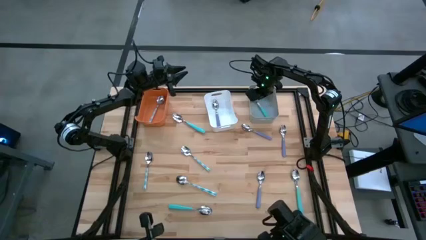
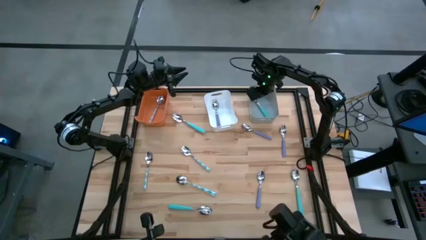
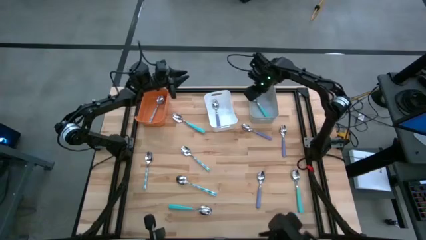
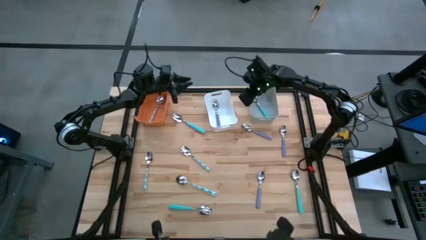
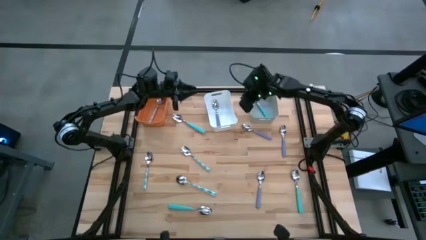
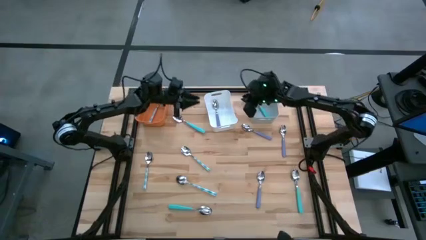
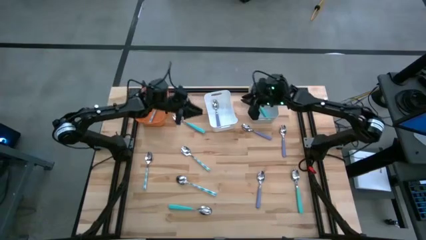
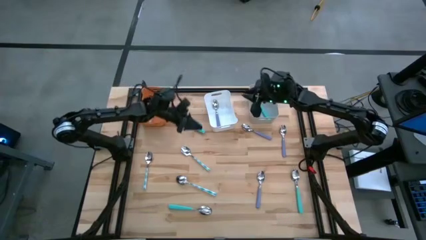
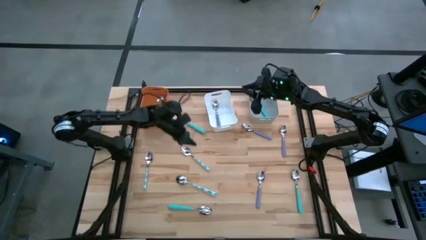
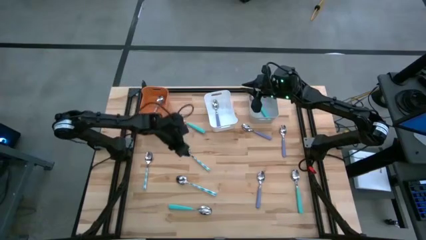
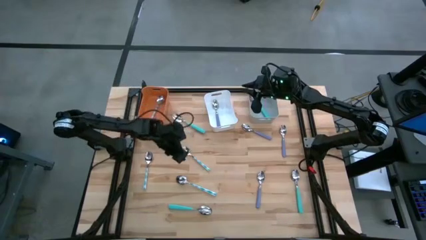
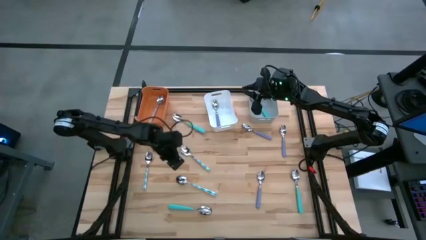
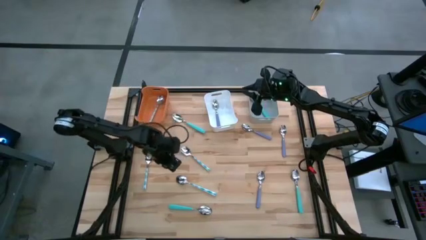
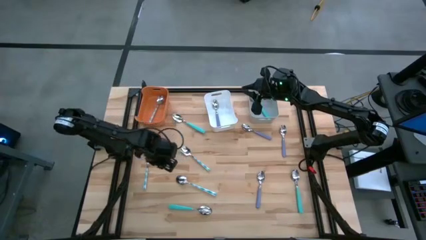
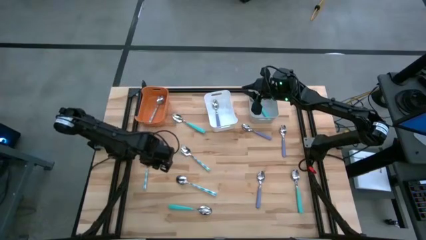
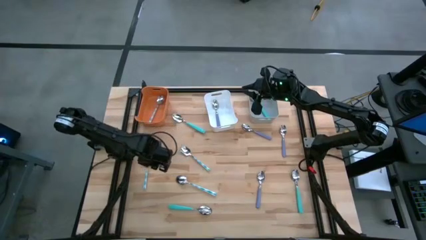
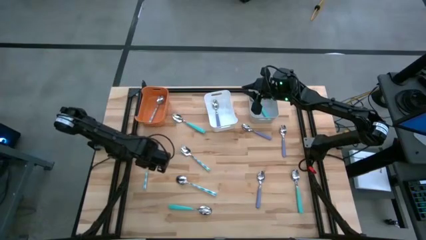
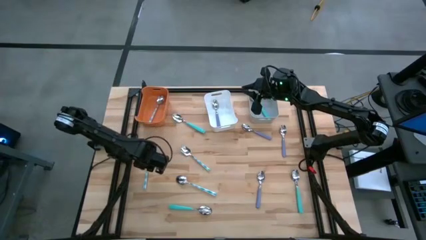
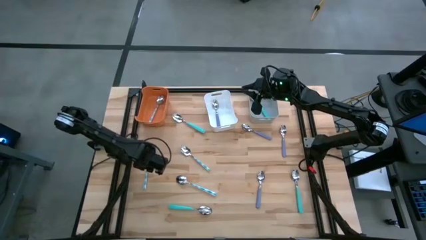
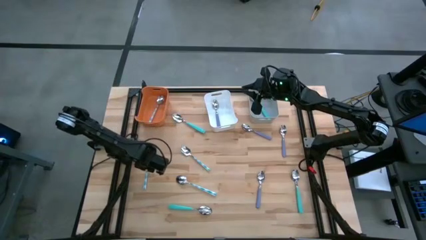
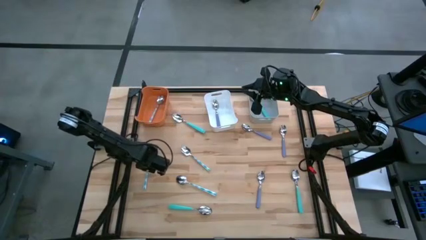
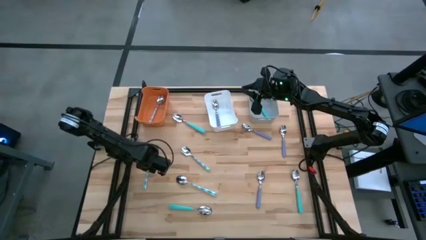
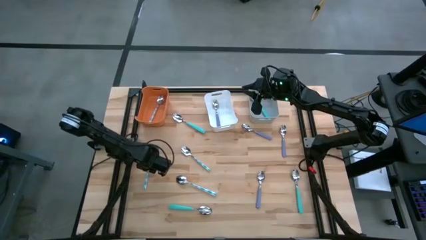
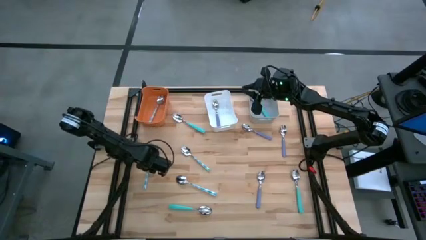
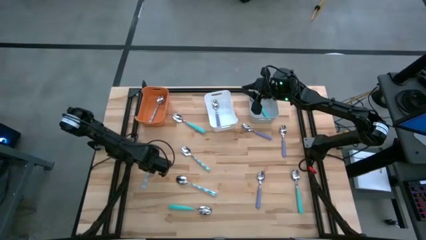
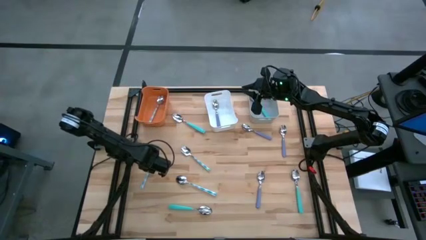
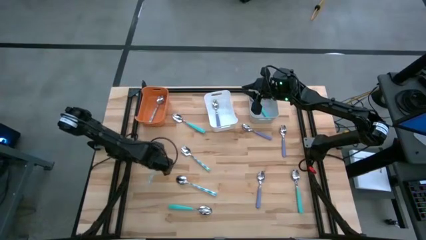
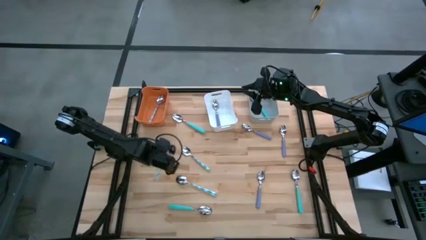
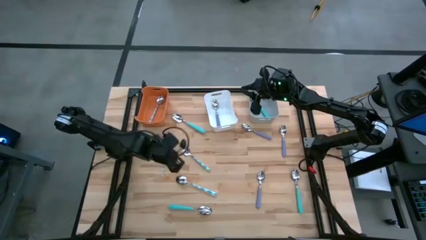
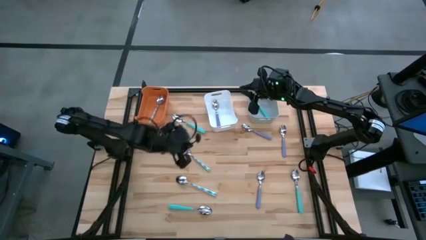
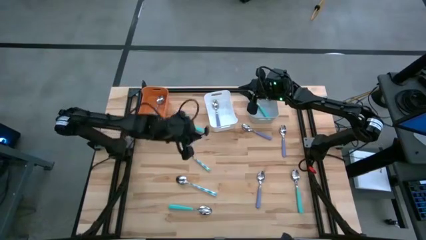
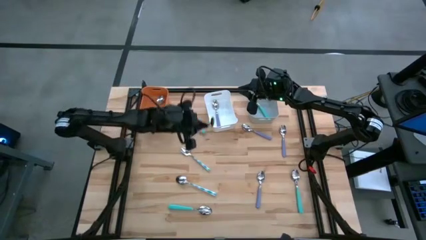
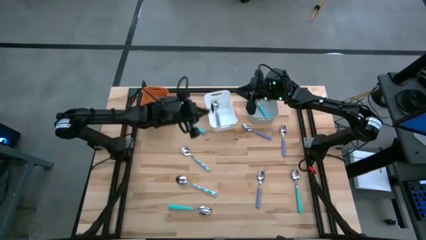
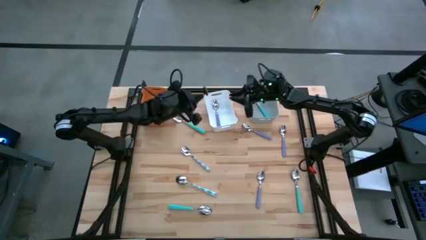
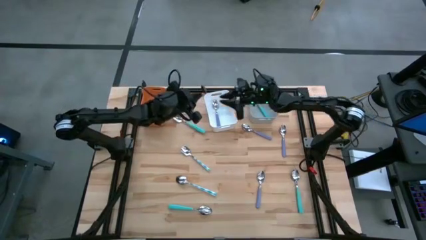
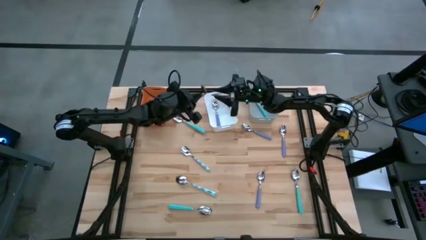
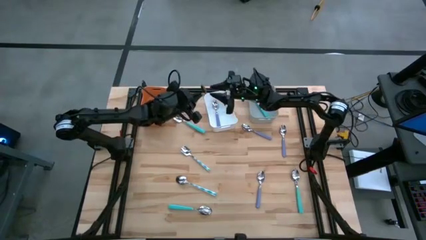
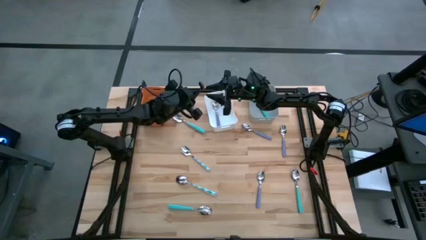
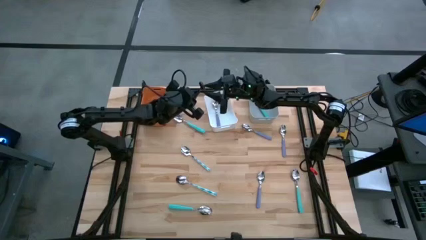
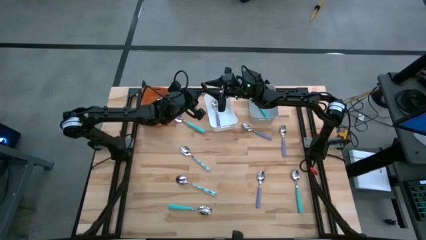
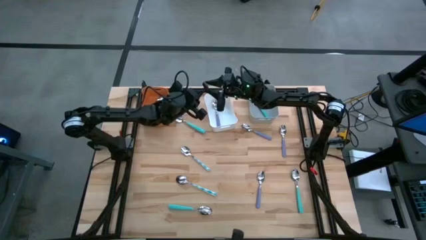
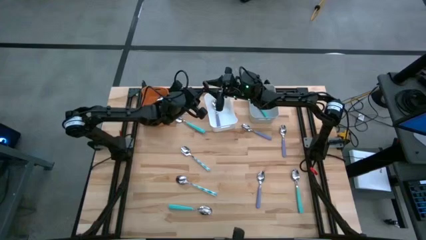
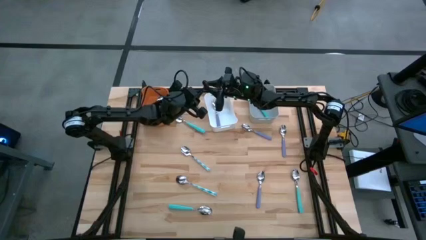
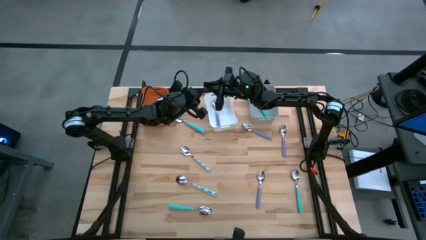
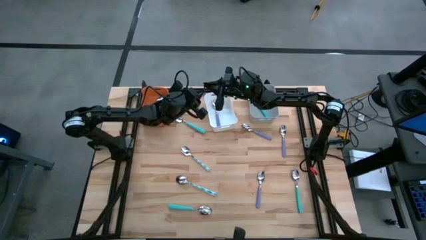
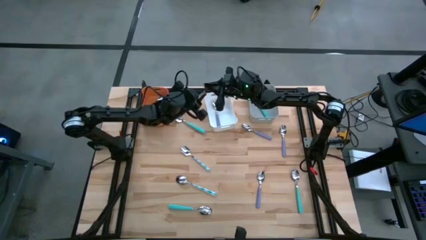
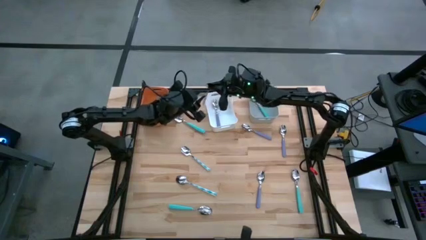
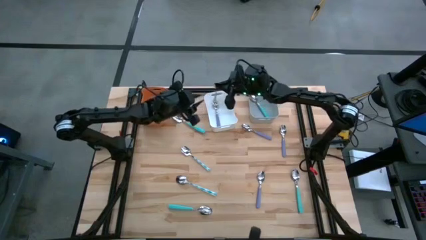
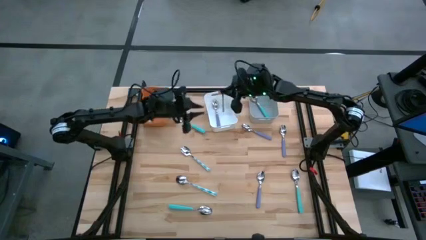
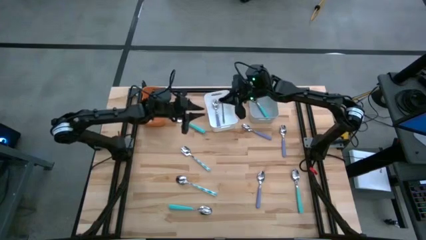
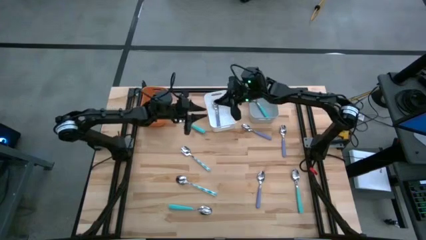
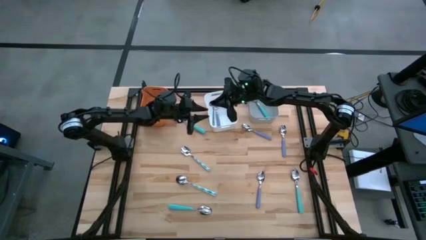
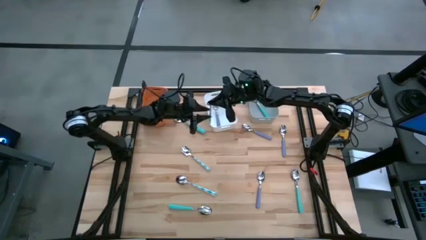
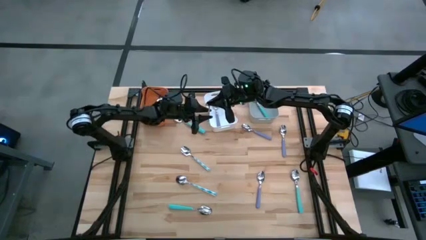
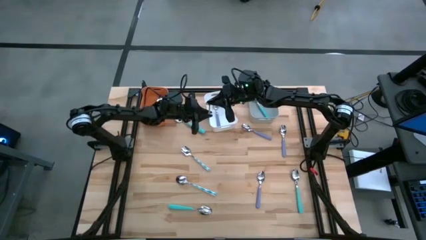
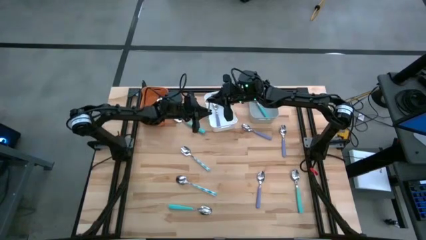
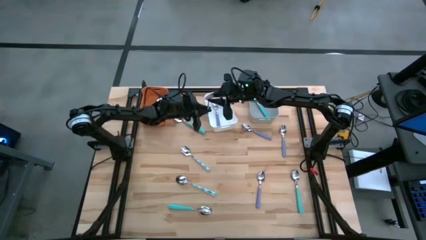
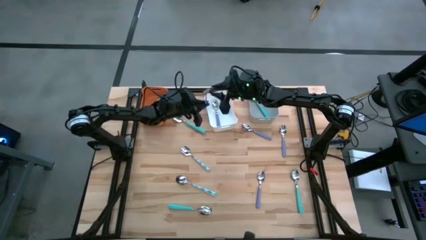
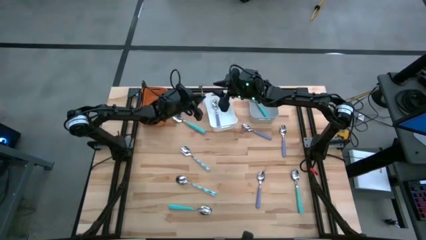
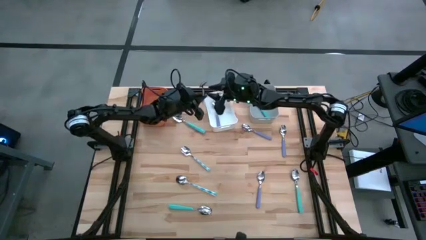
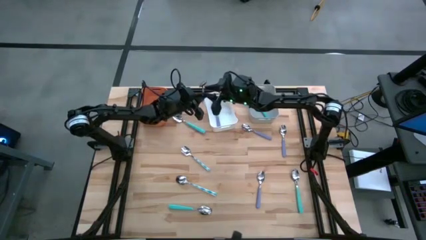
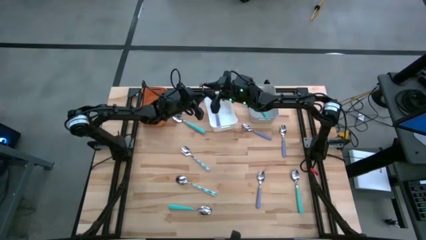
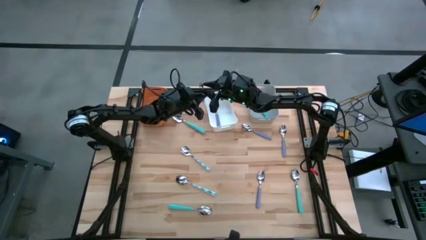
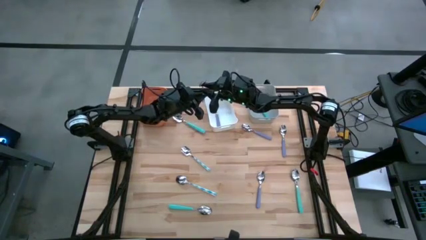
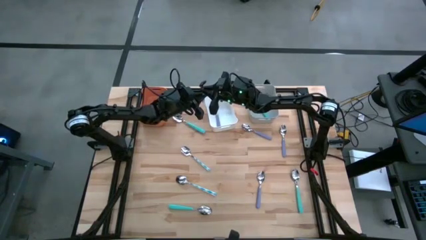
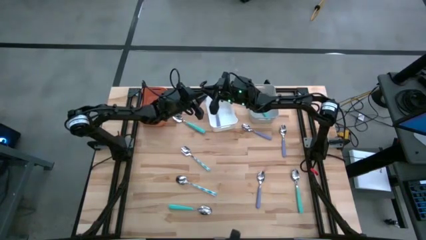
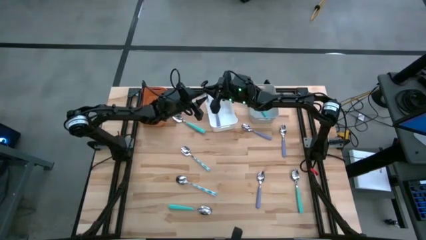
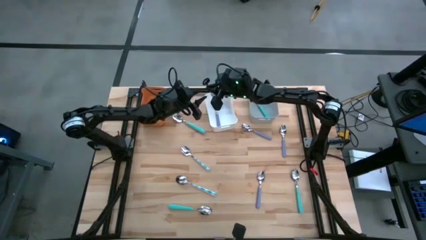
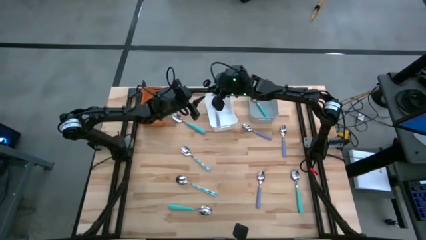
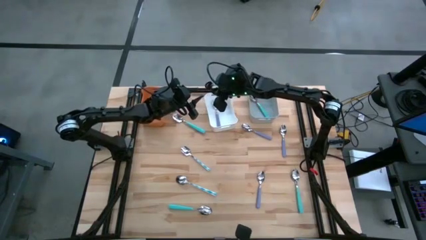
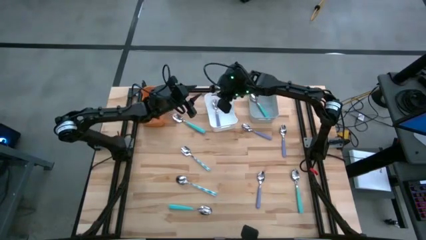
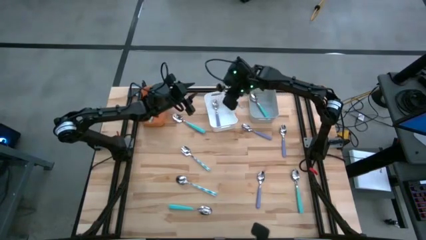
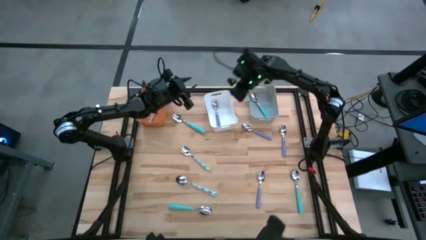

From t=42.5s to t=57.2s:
Task: Sort silverware by color (type)
Put the blue patterned spoon into the orange bin
